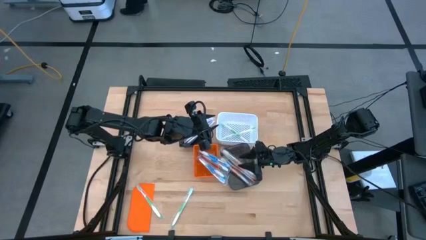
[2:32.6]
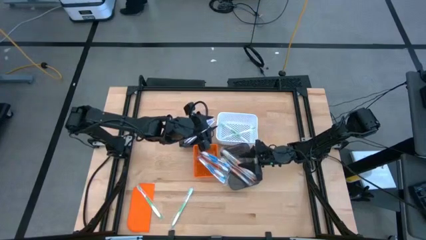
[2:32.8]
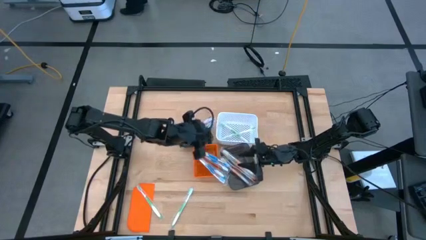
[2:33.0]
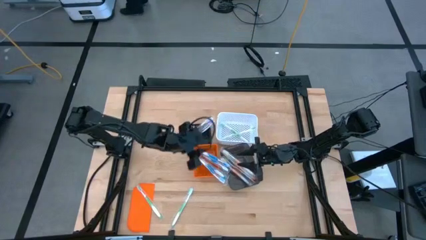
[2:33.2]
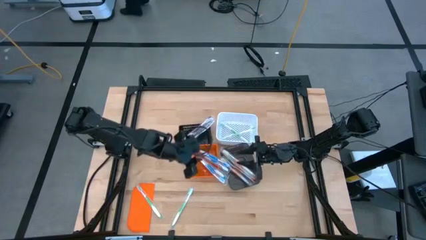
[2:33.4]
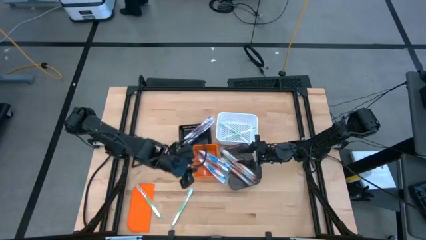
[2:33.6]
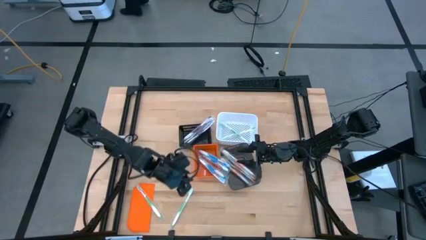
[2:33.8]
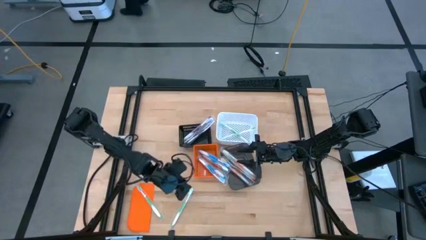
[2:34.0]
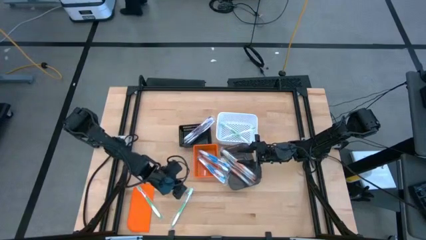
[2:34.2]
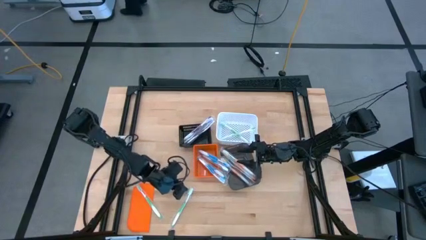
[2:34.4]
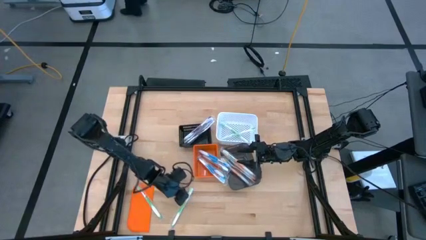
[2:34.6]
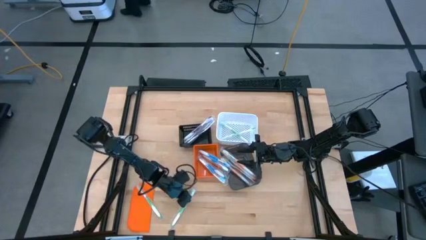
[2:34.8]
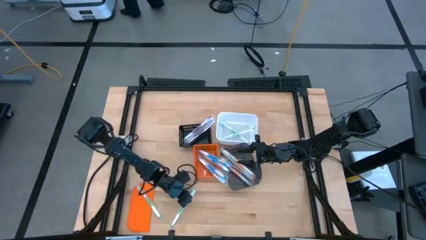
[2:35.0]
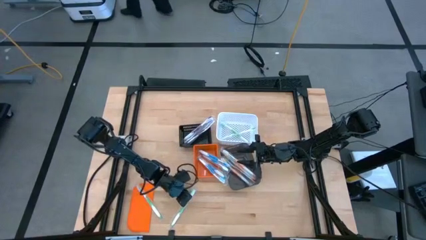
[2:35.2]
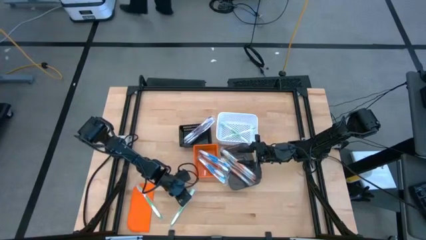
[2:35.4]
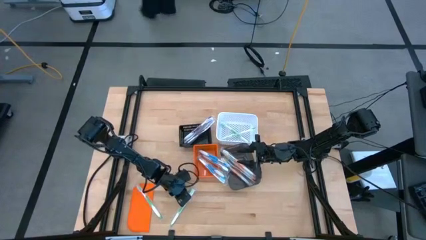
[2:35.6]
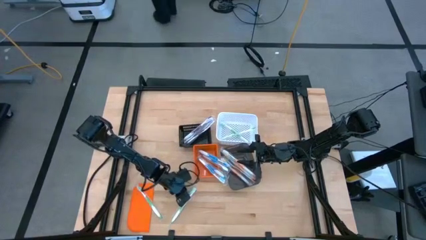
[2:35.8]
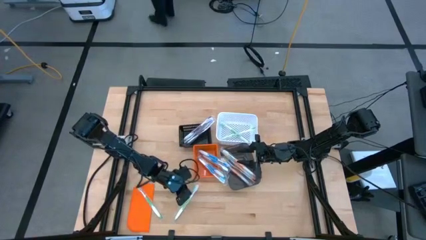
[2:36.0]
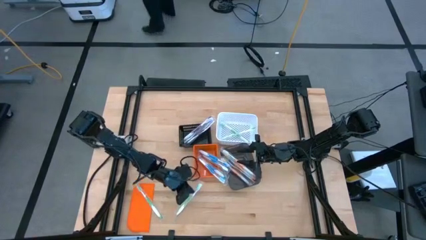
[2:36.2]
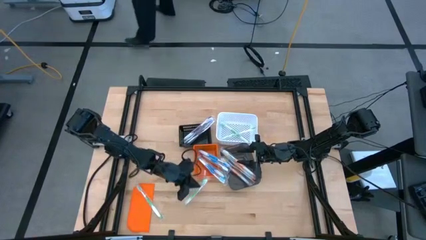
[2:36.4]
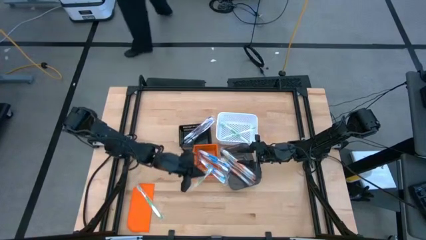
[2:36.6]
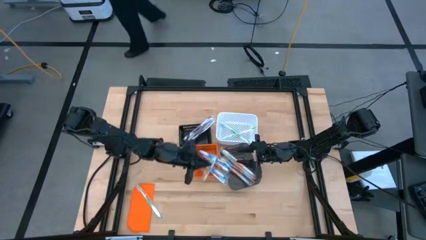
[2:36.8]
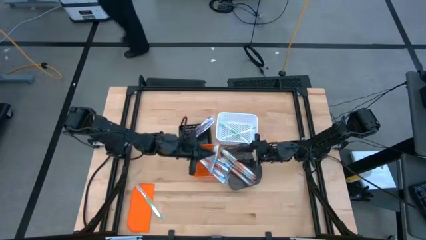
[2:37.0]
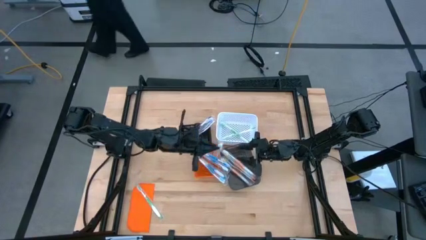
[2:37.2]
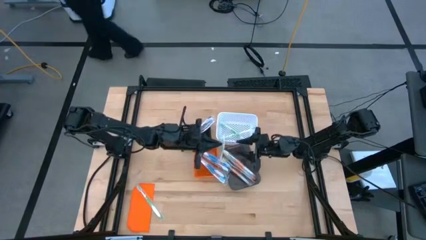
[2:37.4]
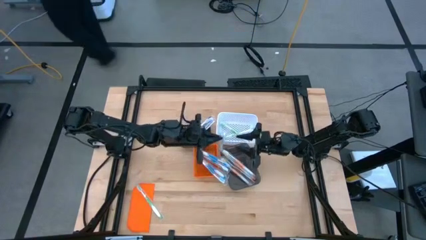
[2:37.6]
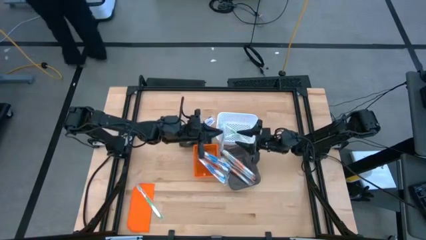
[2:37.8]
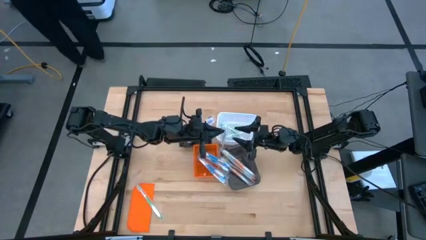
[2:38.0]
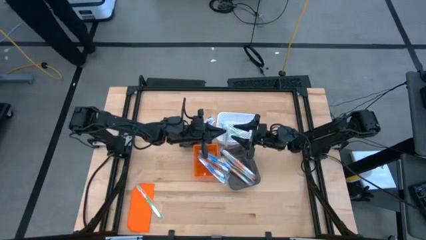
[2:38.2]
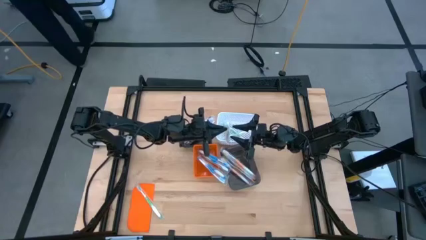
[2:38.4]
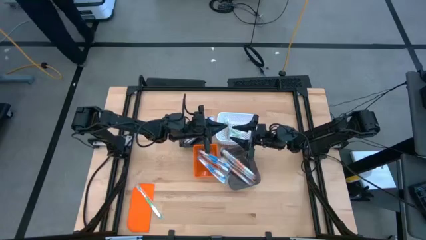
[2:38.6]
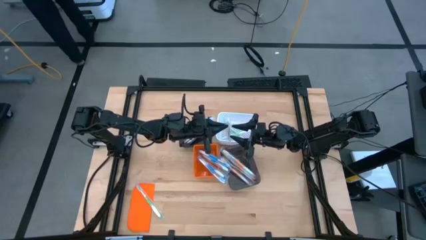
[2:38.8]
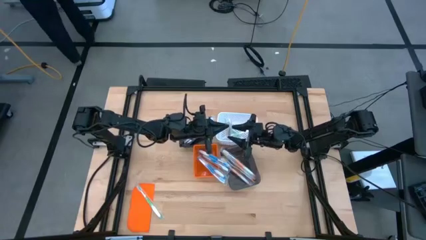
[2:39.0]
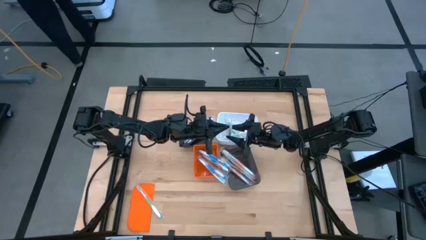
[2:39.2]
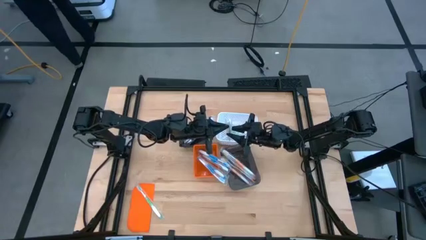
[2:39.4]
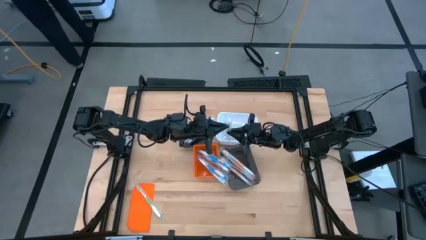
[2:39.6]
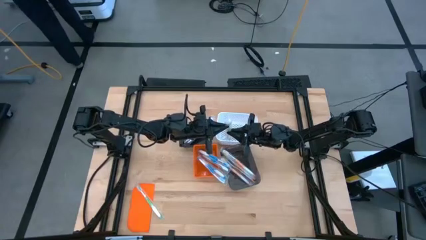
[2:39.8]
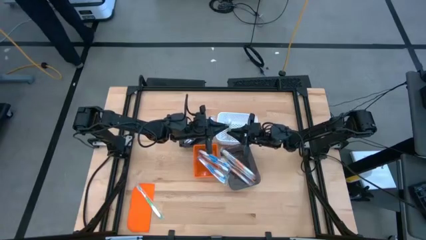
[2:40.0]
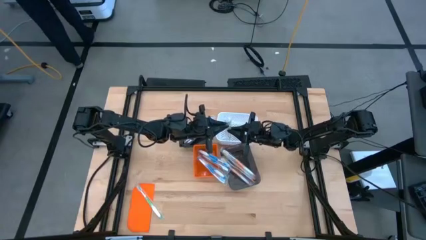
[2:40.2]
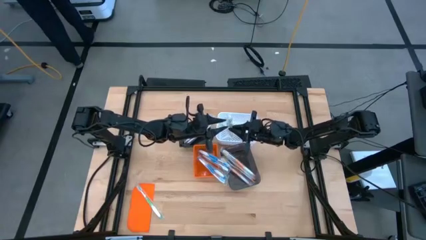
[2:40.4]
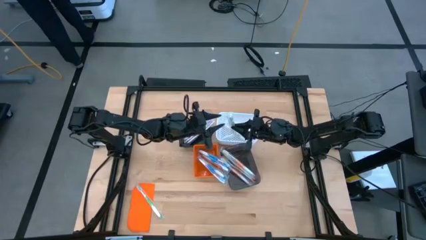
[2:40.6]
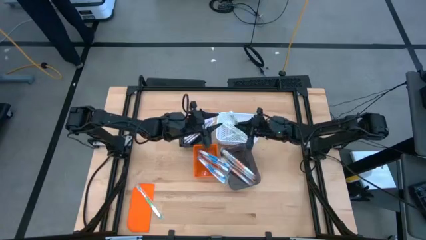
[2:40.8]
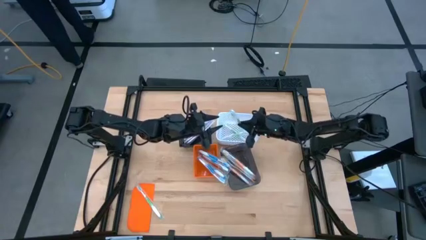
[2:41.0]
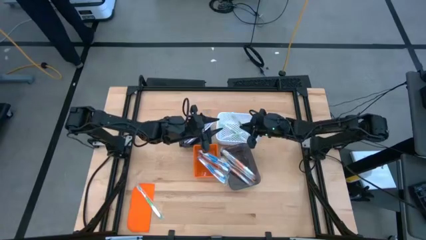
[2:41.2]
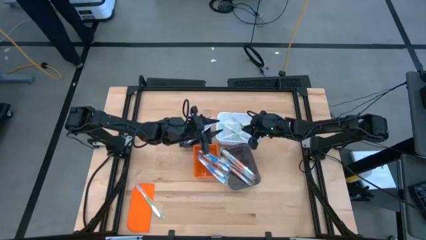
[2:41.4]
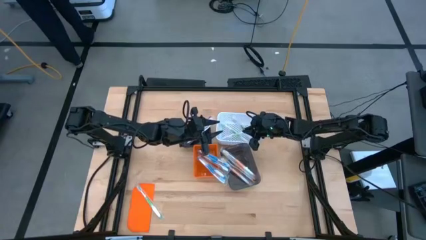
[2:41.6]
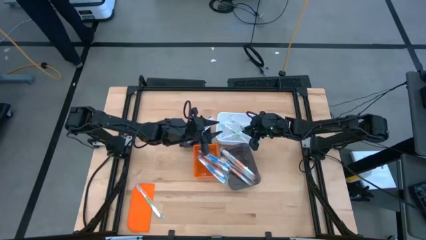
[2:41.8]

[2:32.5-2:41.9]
Task: Pick & Place Toothbrushes
Put the green toothbrush into the white bin

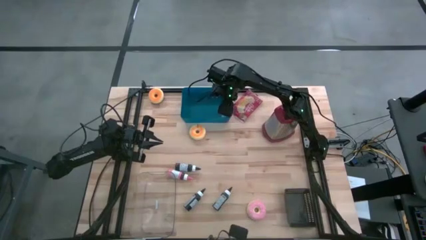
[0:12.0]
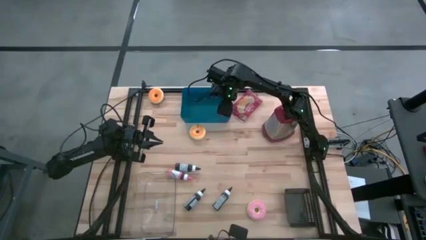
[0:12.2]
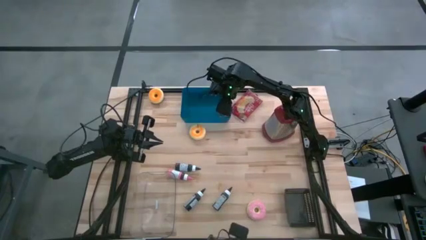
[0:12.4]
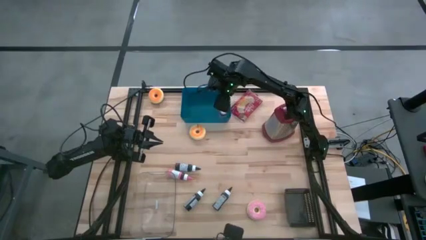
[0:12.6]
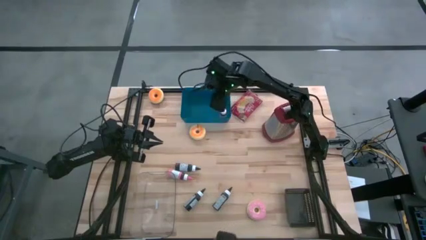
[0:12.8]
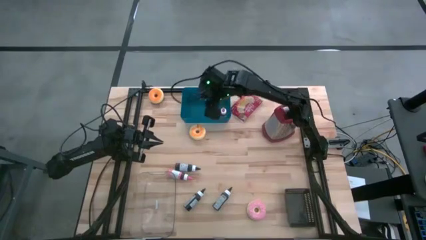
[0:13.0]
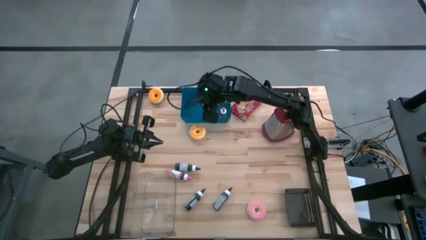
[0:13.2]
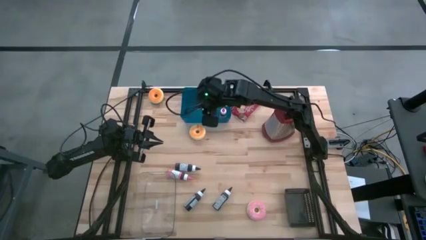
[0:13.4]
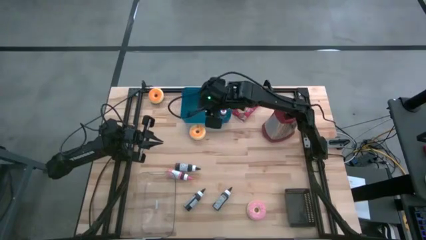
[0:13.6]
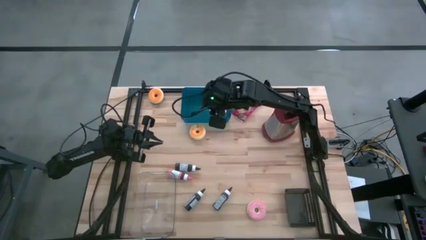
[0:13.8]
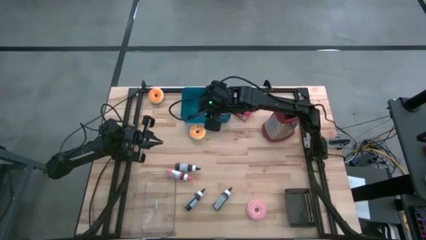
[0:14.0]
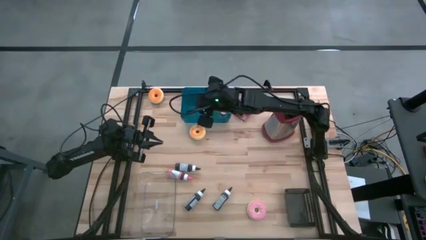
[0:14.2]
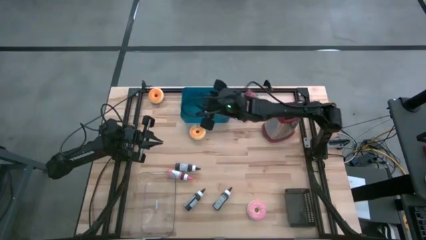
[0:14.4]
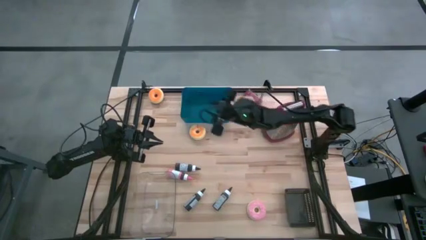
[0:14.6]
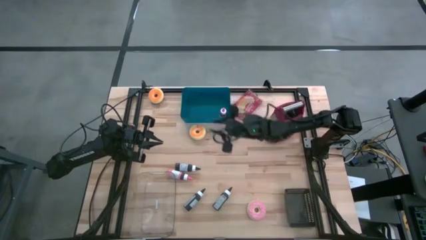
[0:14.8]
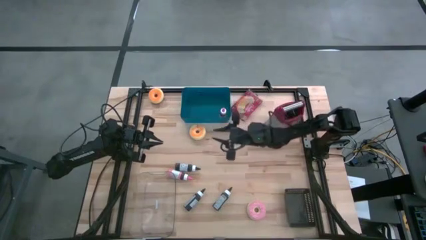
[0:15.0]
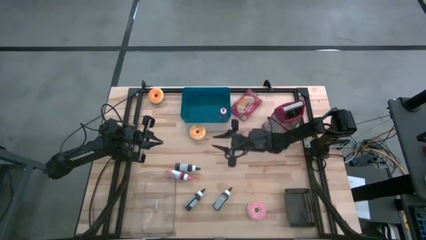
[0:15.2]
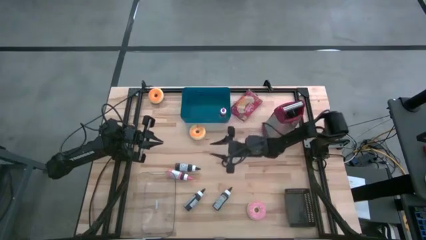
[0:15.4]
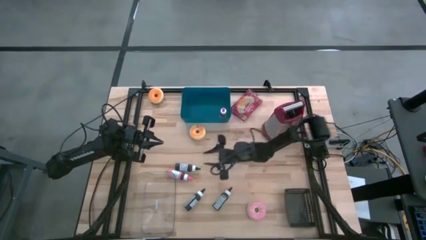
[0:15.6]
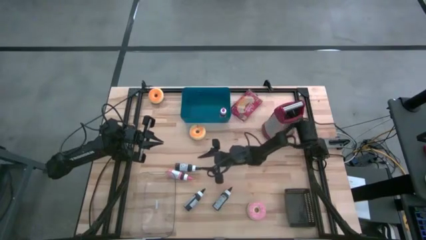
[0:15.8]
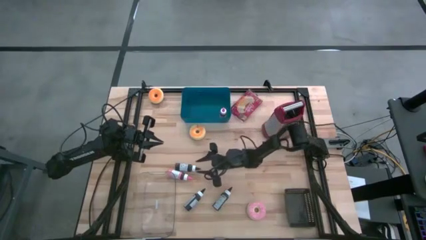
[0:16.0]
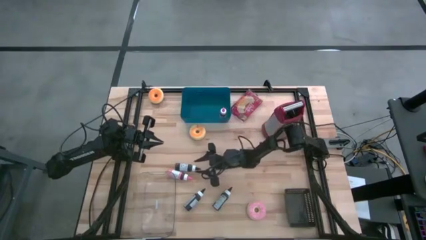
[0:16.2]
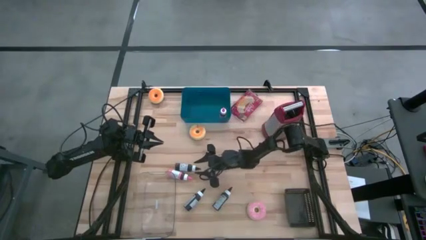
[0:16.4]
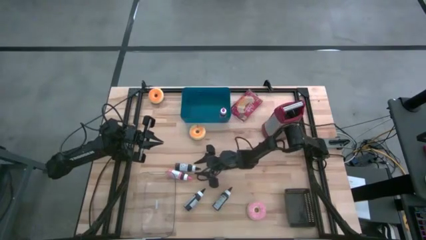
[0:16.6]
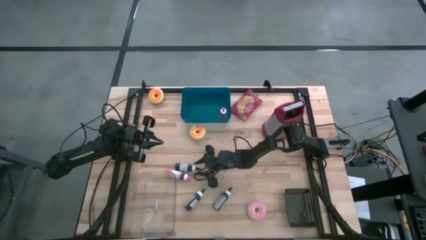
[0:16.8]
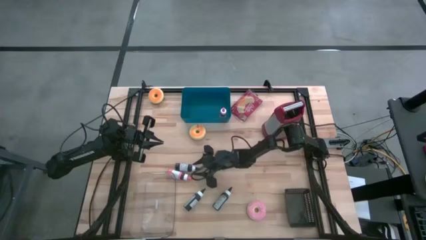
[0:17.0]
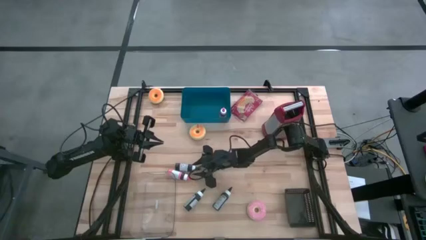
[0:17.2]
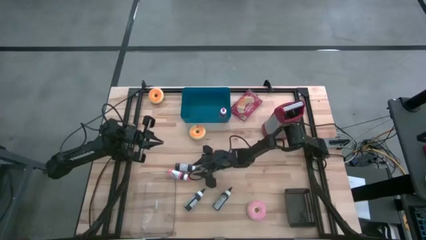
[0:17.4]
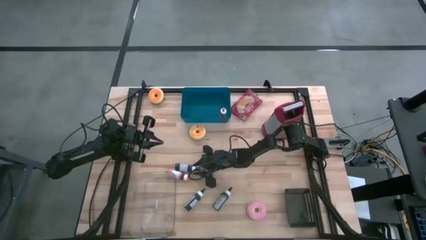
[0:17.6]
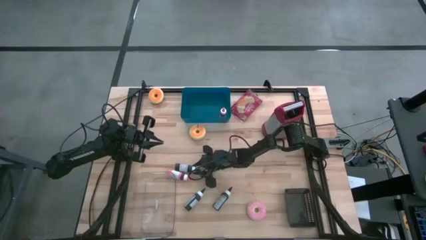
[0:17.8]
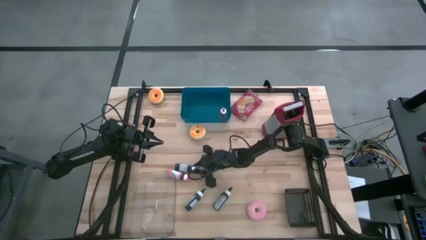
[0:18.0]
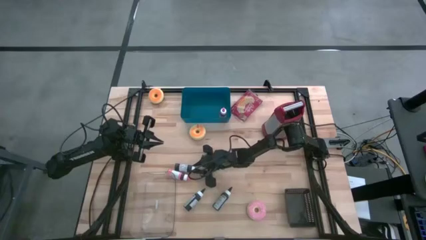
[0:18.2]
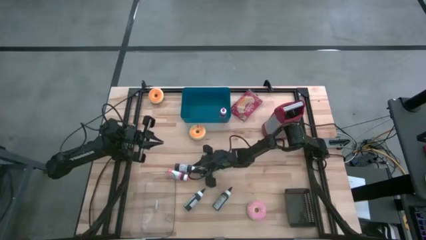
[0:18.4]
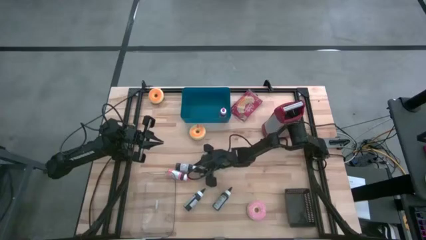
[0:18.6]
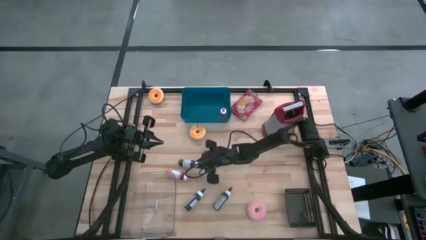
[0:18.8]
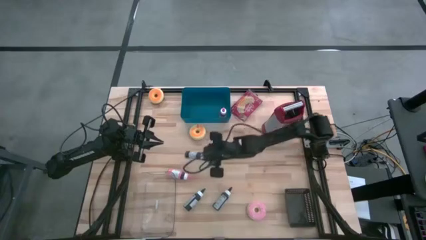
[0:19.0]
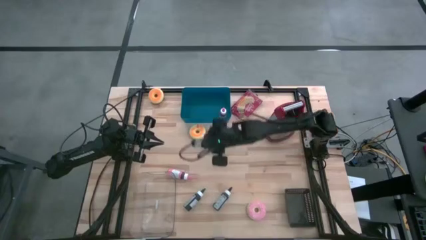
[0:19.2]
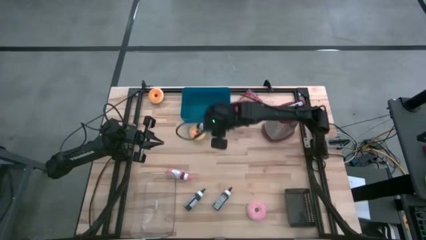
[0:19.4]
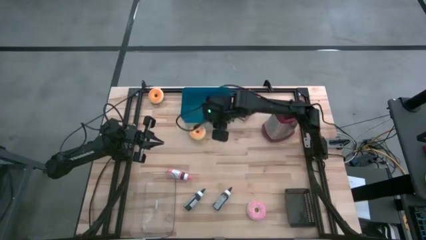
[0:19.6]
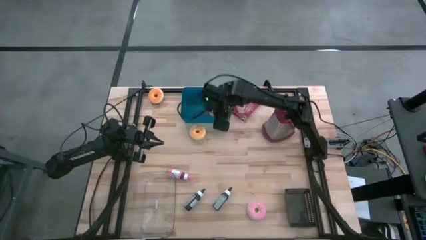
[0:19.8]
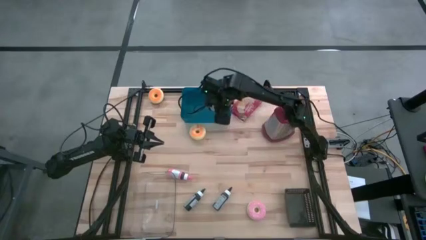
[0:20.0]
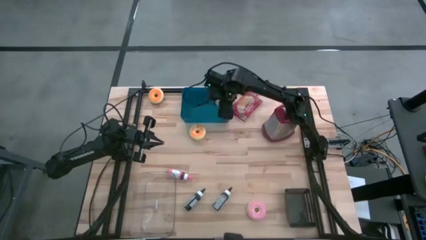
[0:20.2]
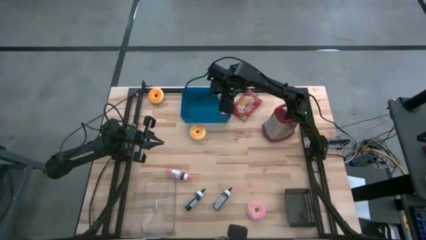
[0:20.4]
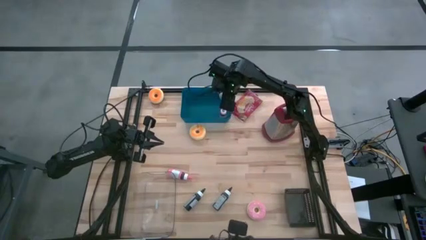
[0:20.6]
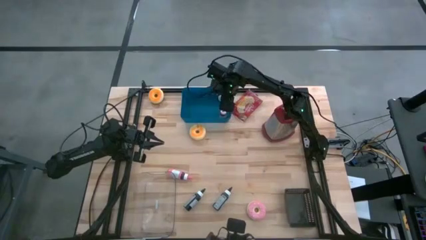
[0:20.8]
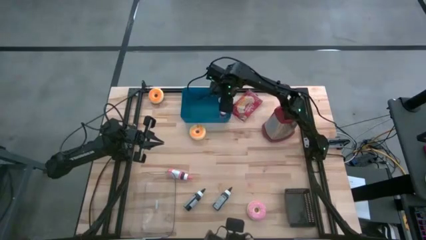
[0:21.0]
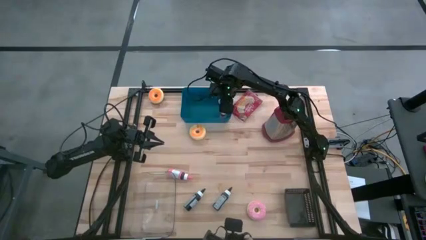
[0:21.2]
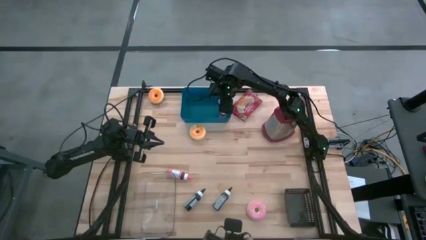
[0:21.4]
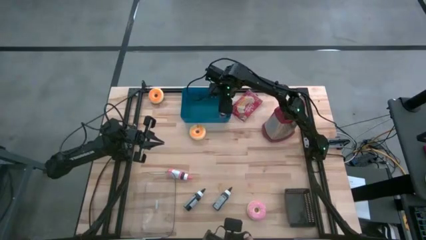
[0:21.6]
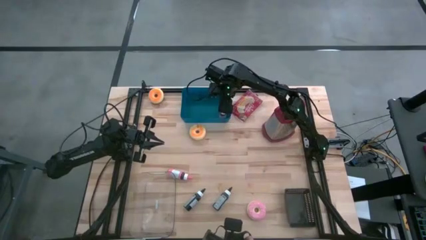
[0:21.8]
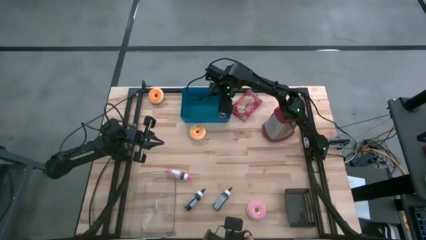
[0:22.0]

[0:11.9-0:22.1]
Task: Pick & Place Food Item
Put the top black food coloring into the blue bin
